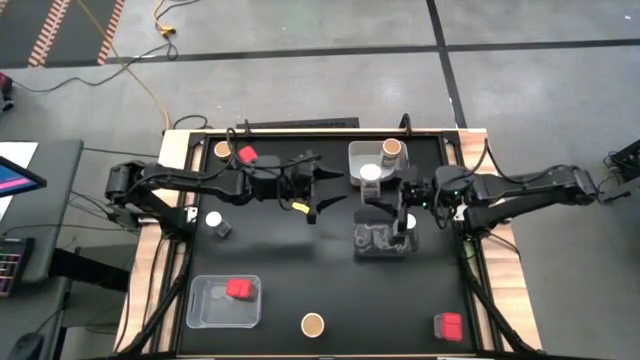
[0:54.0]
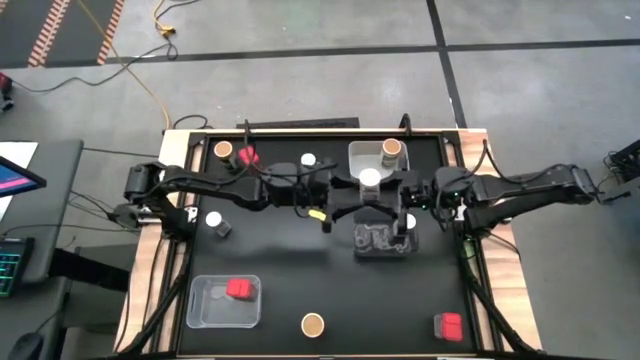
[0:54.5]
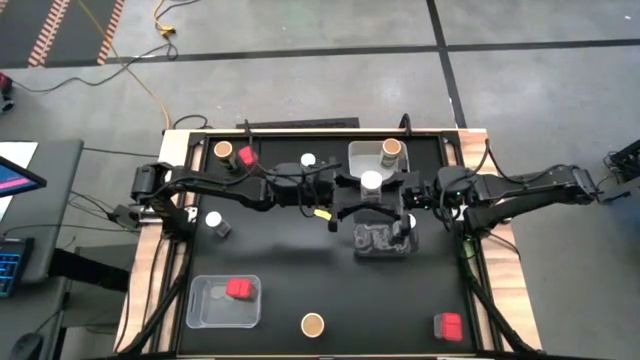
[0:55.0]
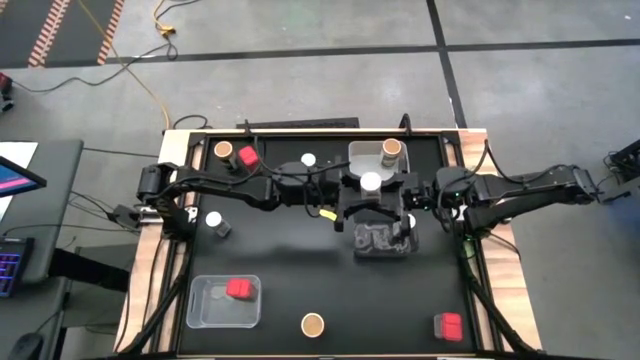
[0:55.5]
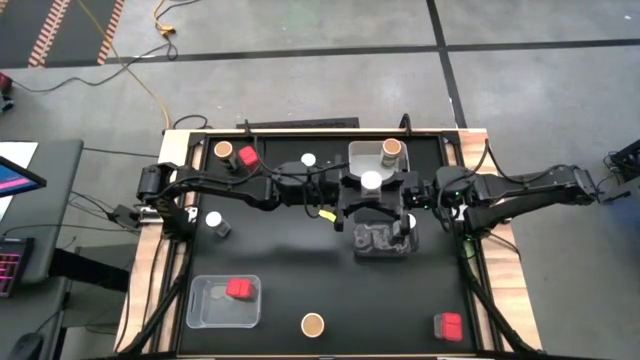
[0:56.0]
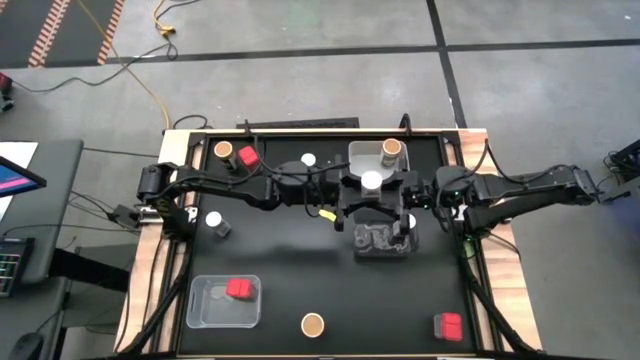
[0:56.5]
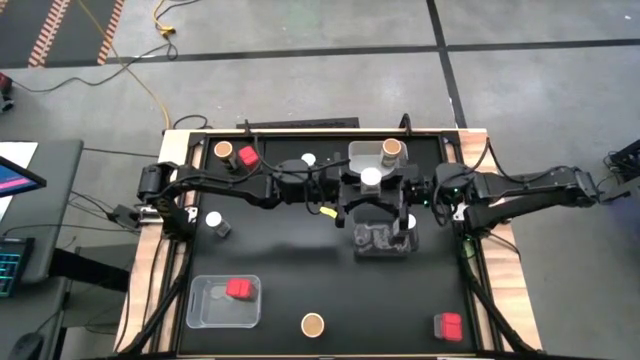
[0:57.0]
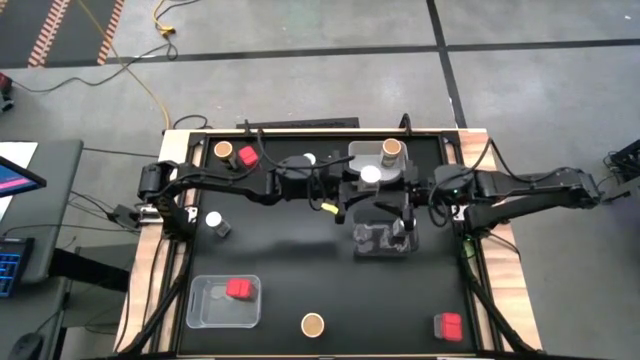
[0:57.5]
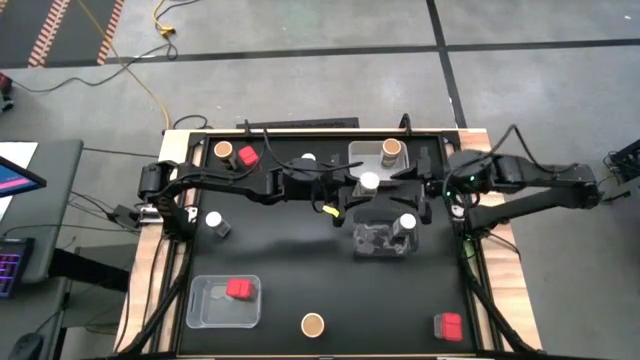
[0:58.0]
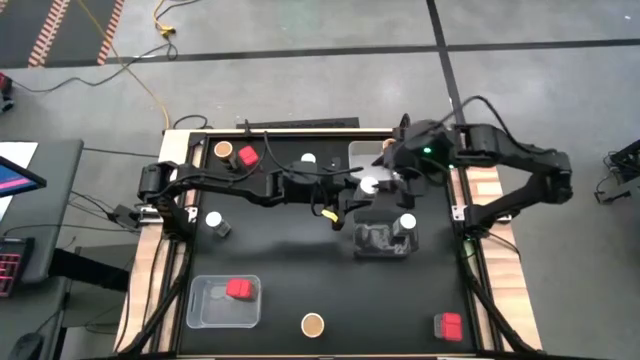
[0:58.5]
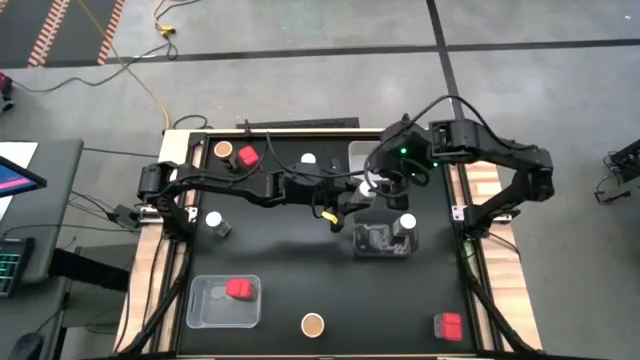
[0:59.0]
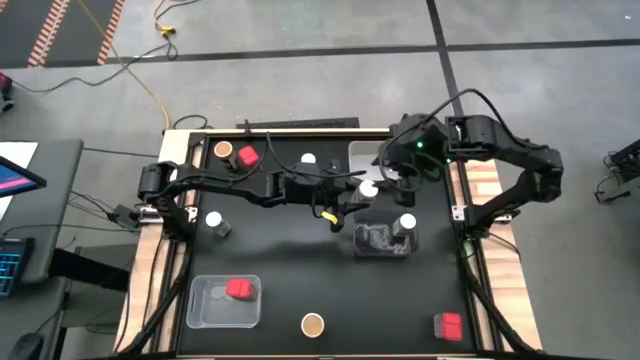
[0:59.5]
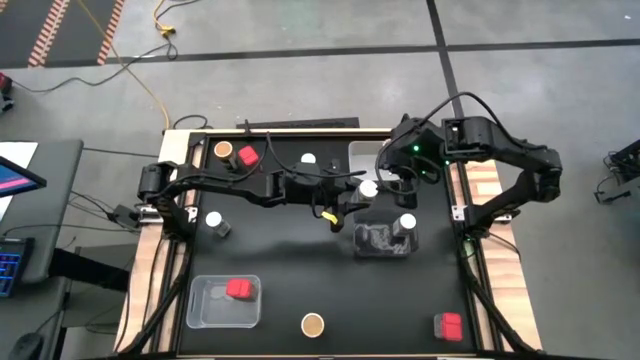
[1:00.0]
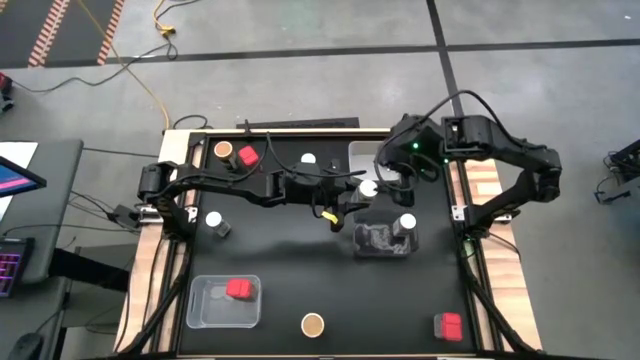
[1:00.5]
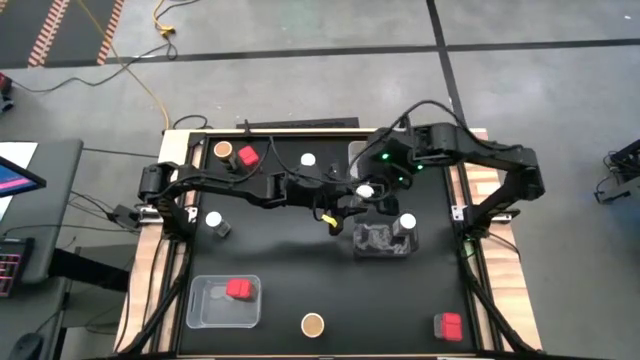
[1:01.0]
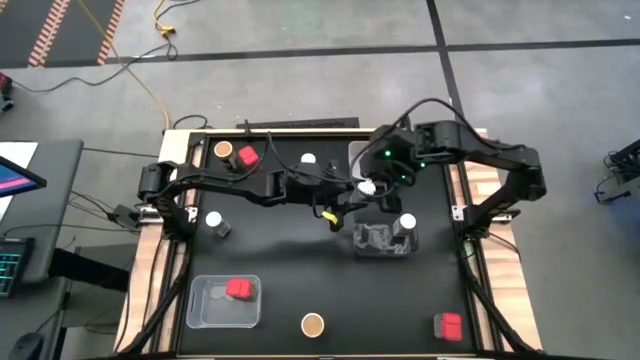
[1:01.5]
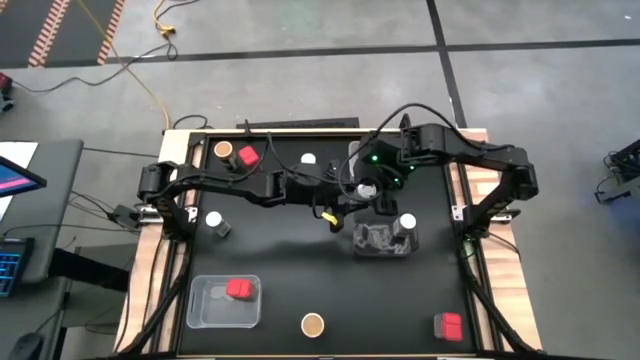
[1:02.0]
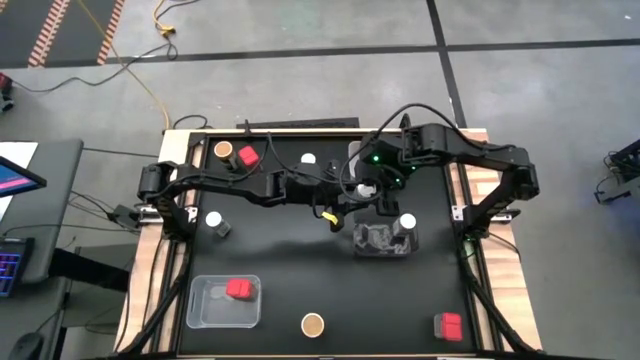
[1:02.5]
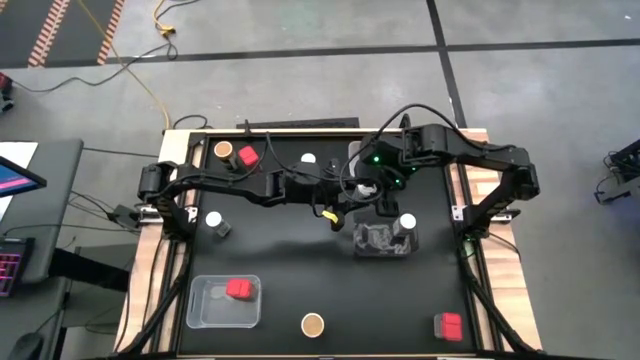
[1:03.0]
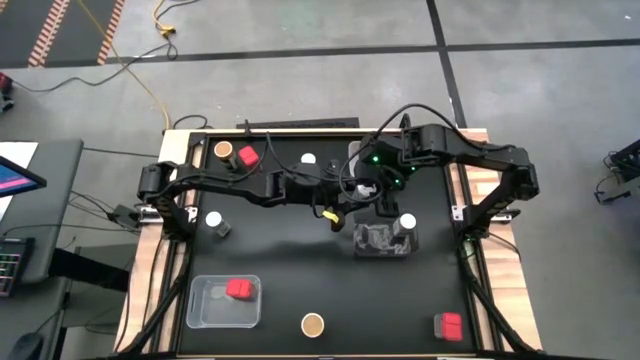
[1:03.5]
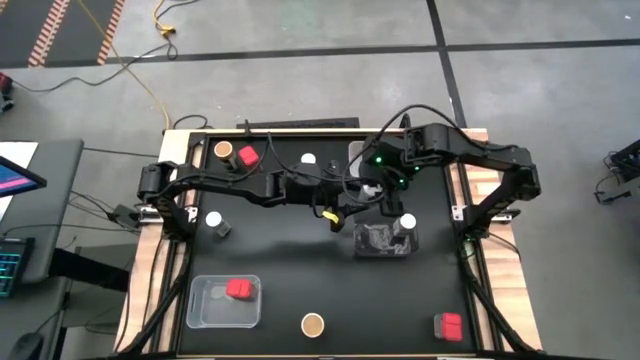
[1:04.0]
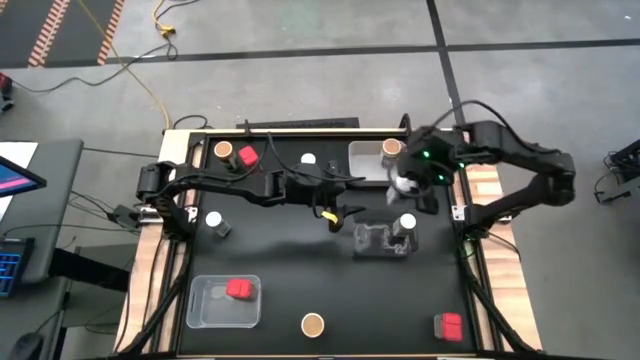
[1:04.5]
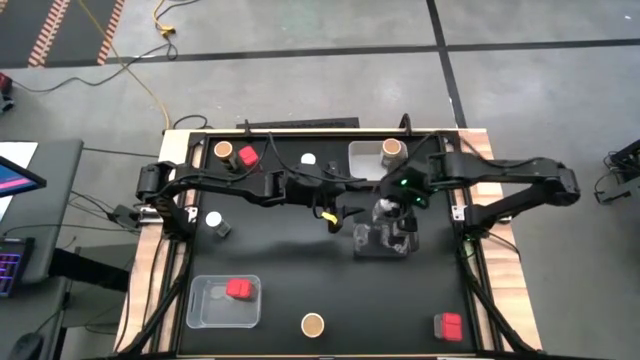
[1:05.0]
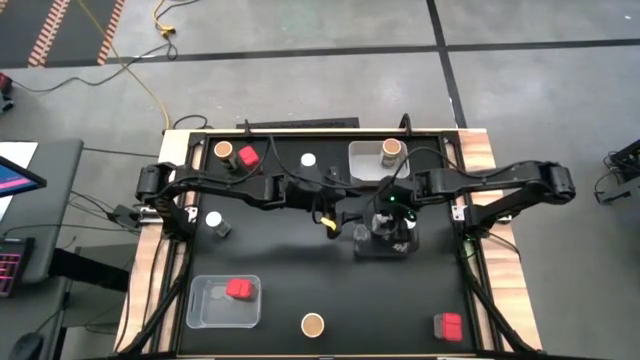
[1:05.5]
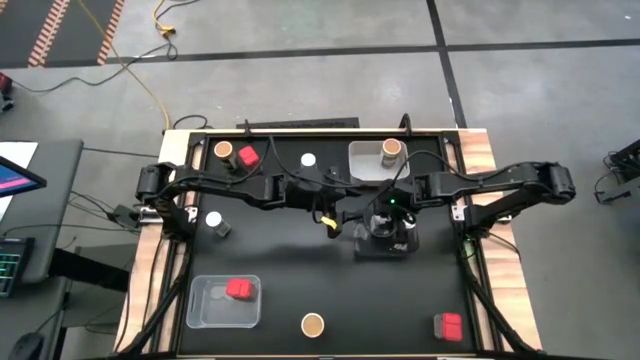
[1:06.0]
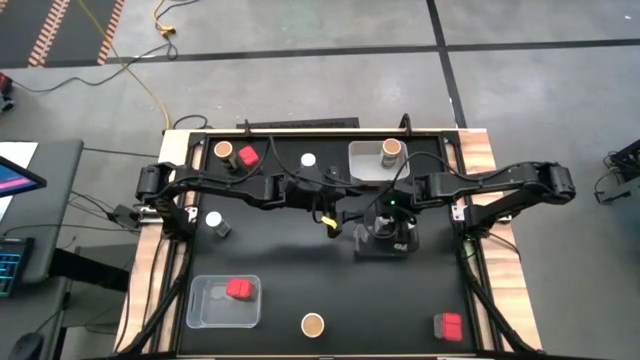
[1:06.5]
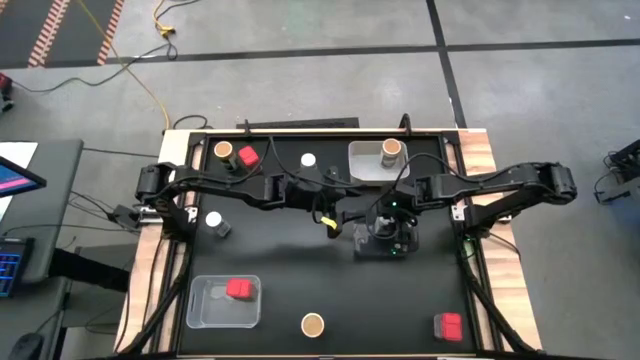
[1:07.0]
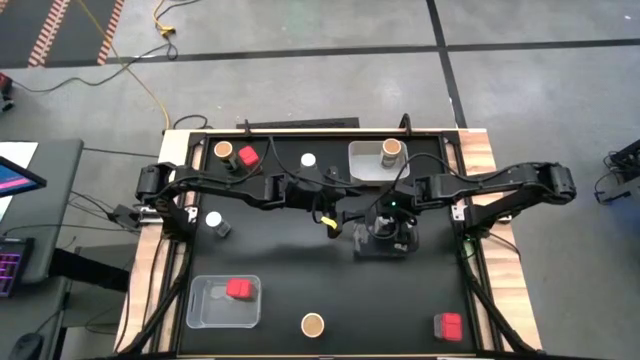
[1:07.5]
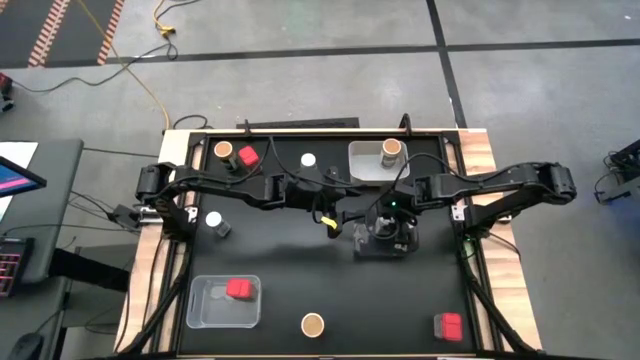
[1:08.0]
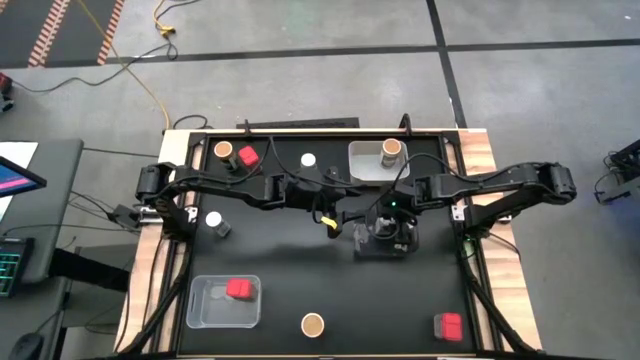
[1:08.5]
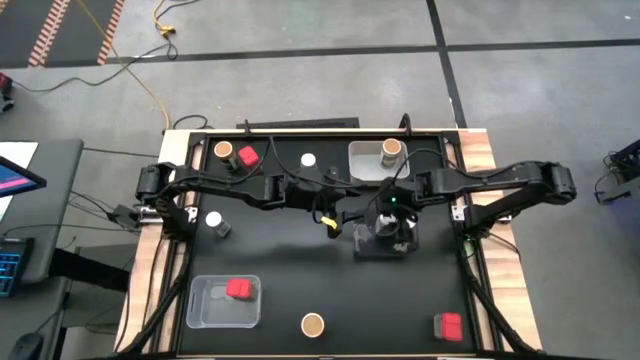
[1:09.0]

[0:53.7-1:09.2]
Task: Sort spices by type
Put the center left white spice bottle in the black bin

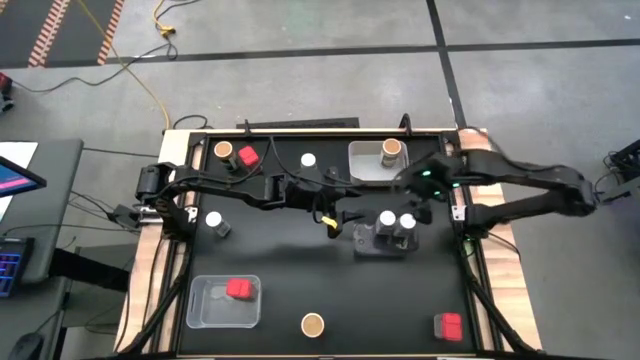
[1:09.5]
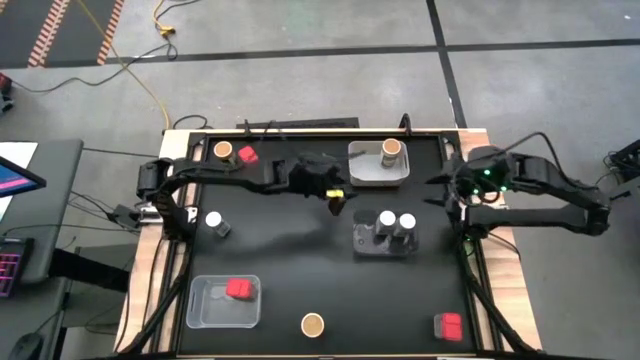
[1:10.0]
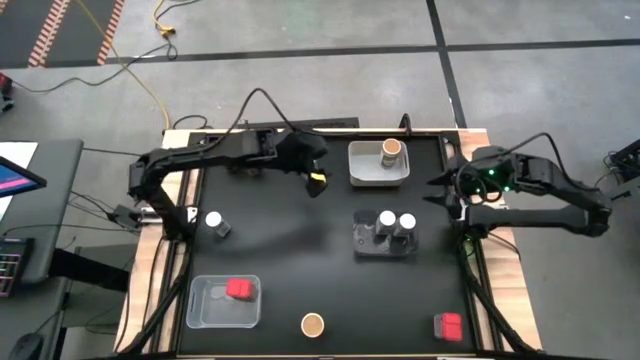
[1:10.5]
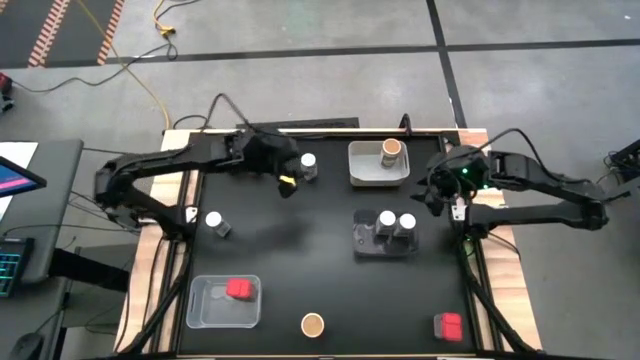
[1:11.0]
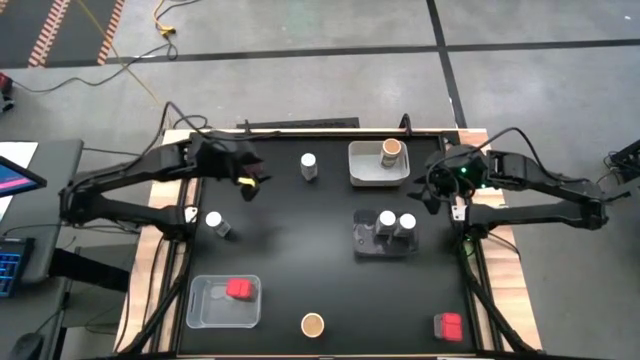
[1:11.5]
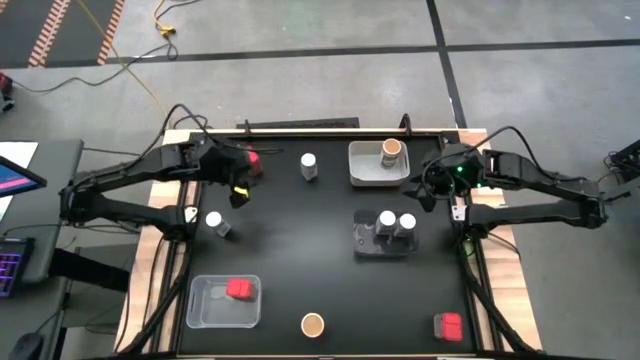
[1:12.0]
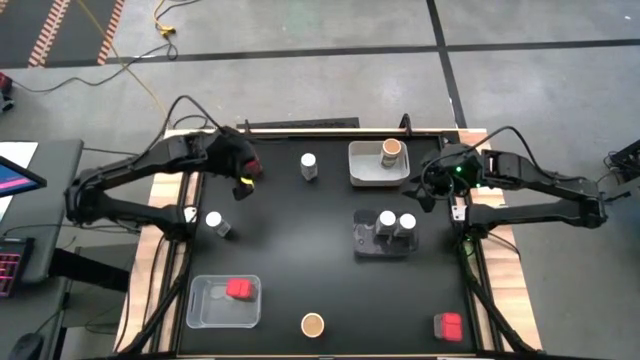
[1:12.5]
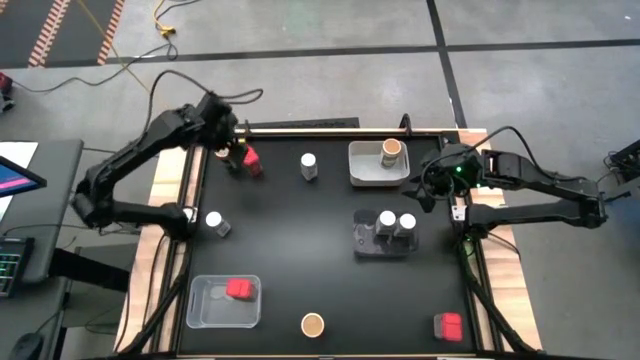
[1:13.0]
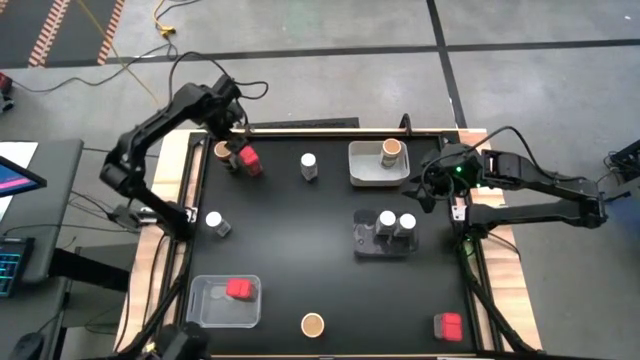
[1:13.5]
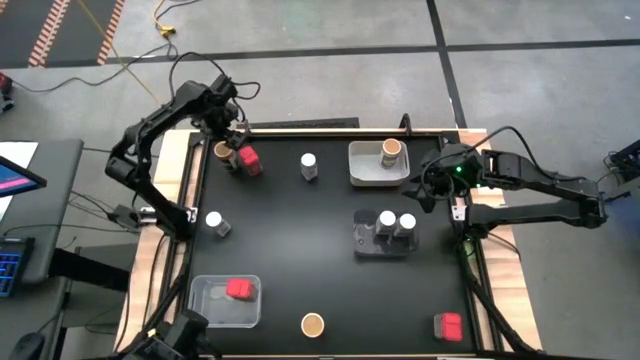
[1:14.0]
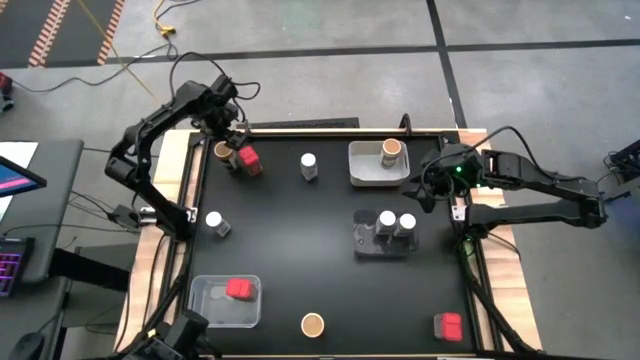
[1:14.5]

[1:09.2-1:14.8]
Put the top left red spice can in the transparent bin

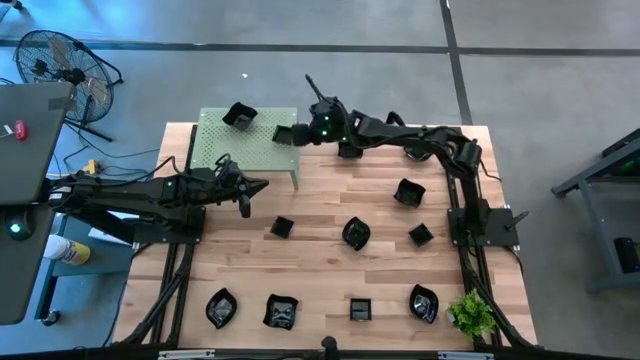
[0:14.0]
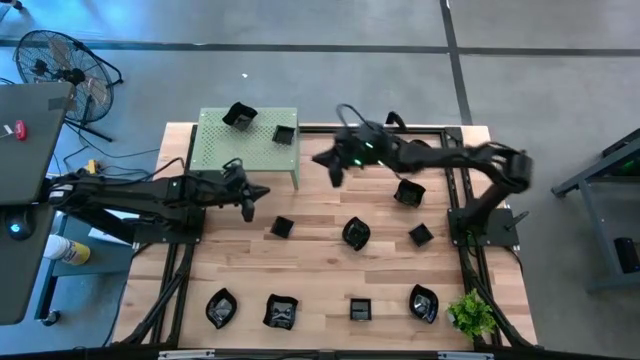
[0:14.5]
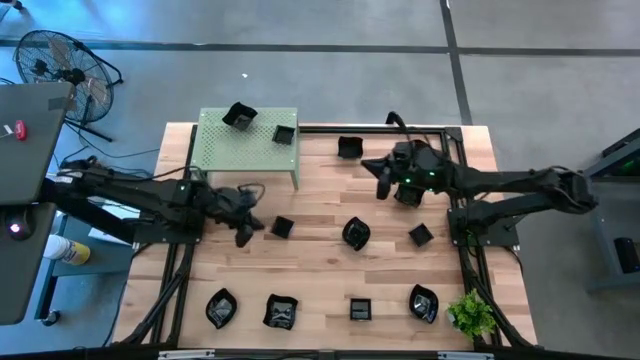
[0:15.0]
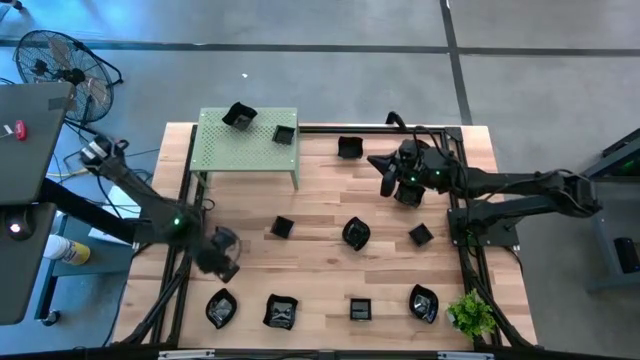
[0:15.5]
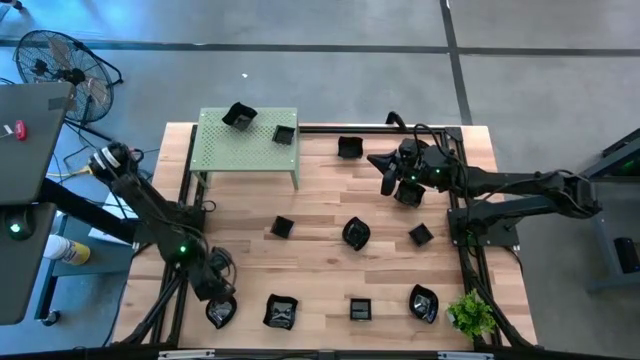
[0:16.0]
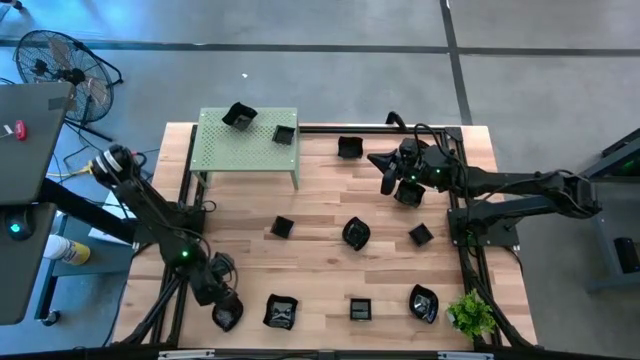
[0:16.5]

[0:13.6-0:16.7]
Task: Pick & Place Mini shaped plates
Put the black leaf-shaped plate on the shelf
